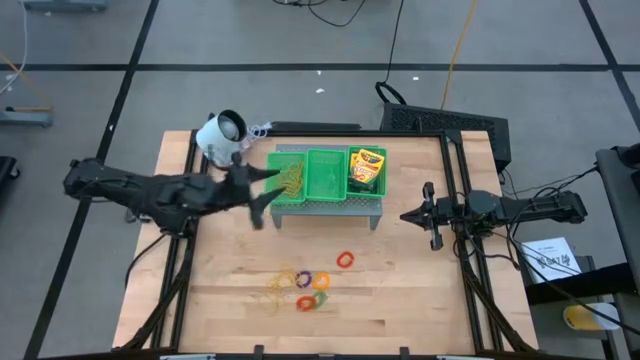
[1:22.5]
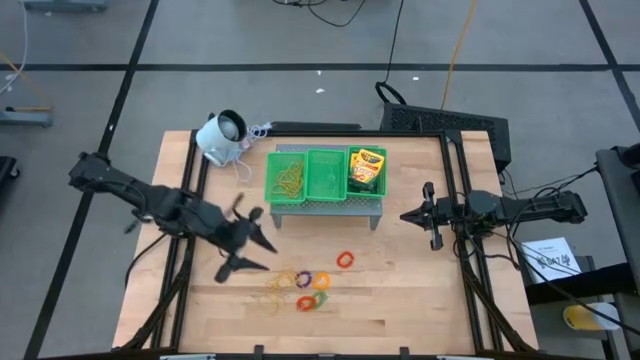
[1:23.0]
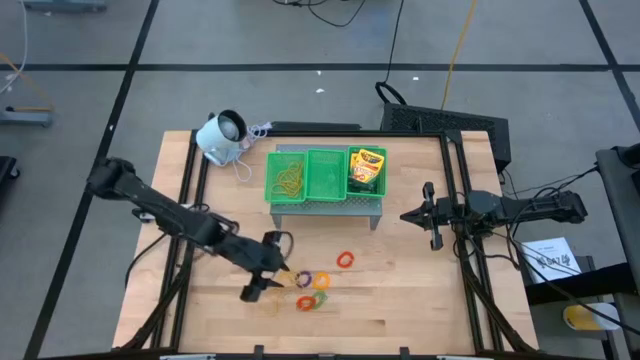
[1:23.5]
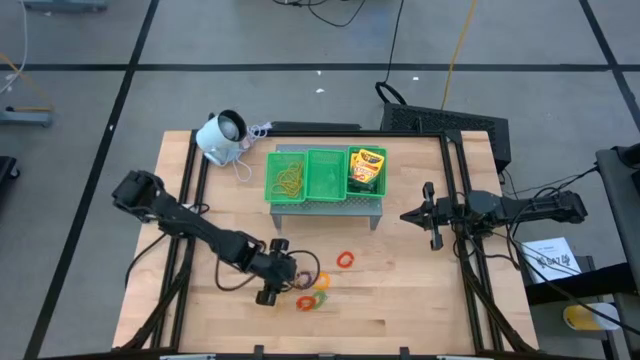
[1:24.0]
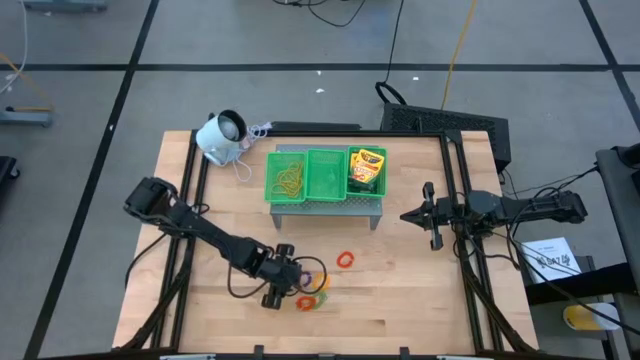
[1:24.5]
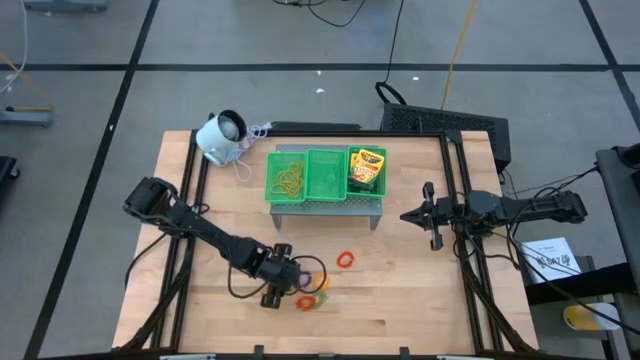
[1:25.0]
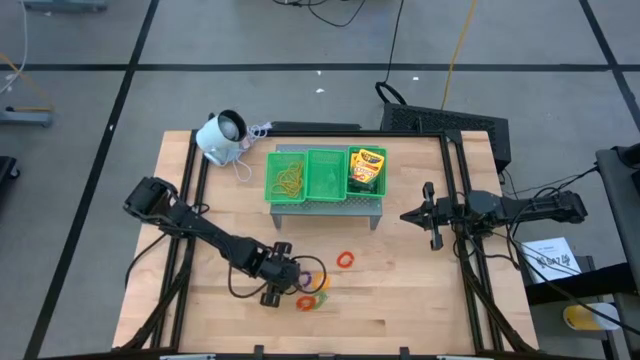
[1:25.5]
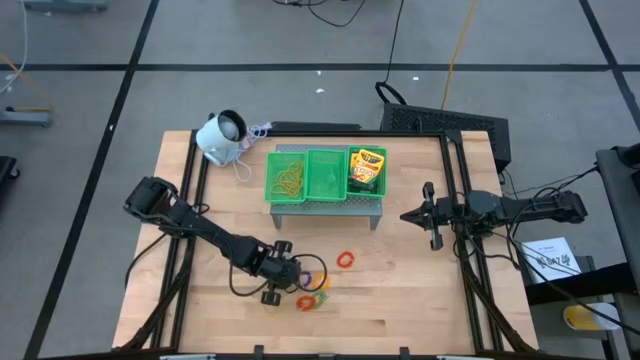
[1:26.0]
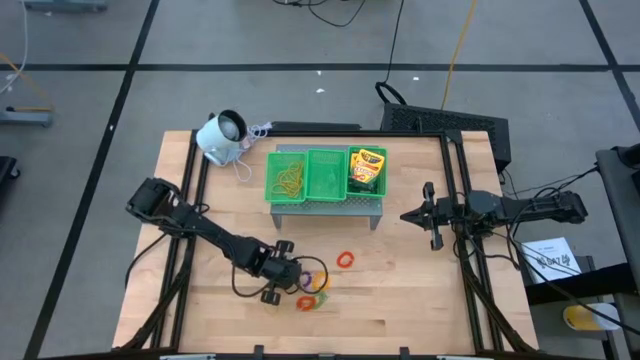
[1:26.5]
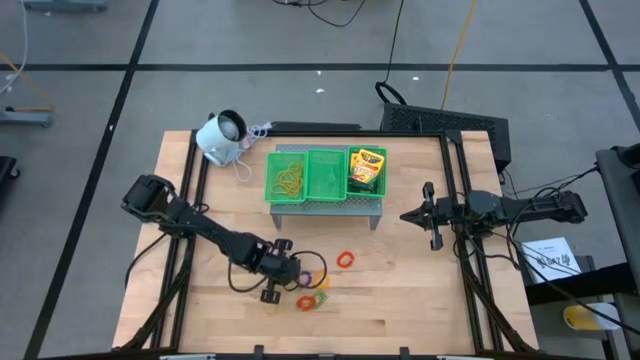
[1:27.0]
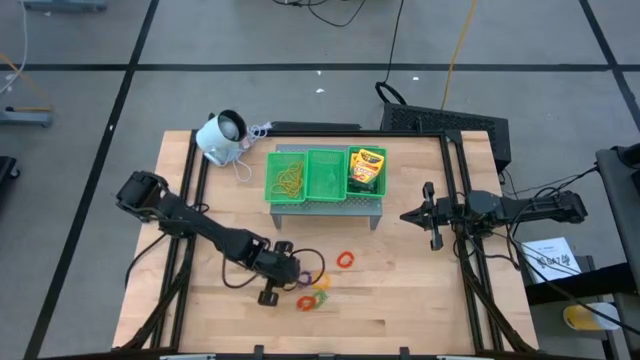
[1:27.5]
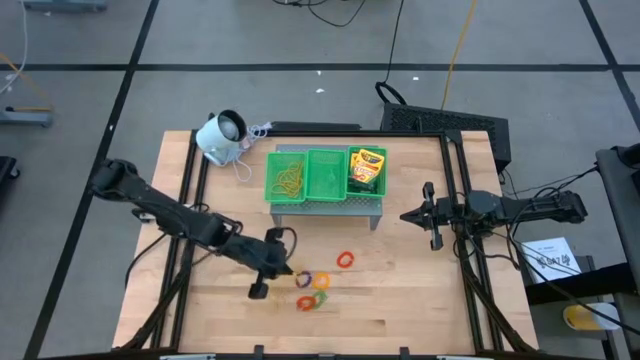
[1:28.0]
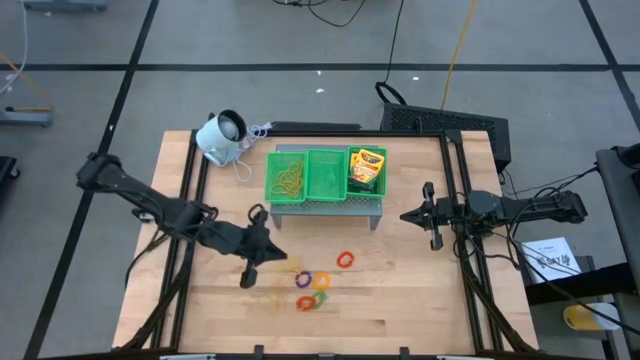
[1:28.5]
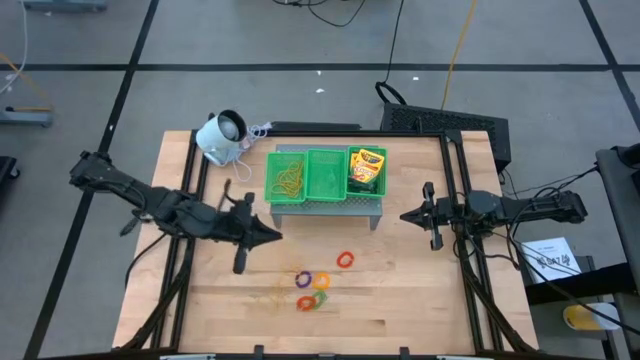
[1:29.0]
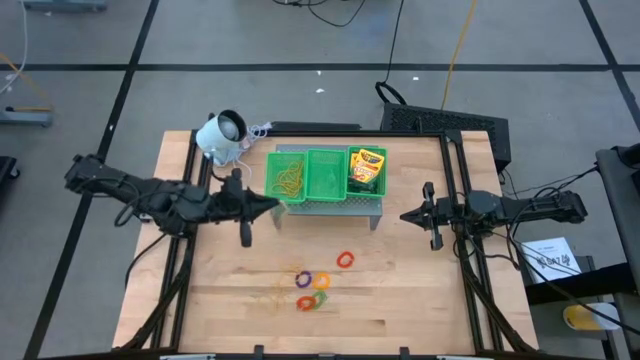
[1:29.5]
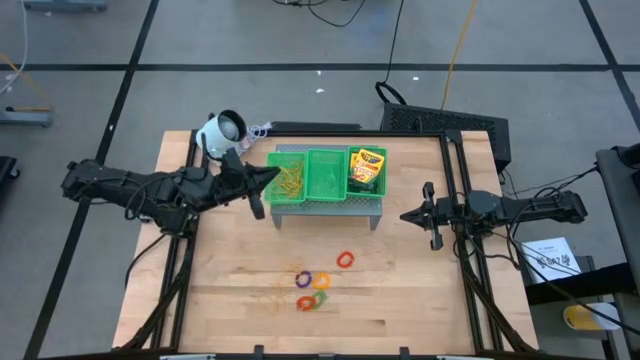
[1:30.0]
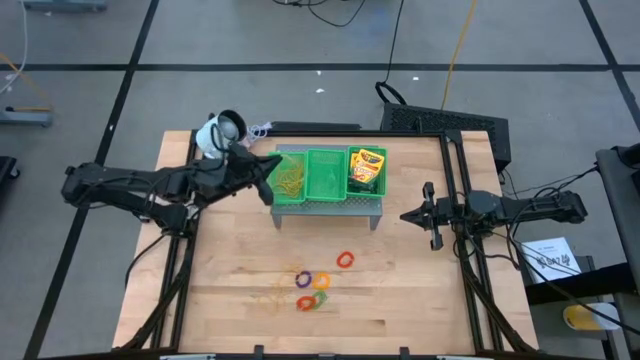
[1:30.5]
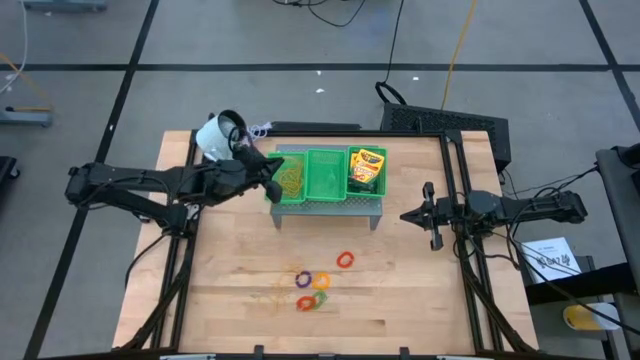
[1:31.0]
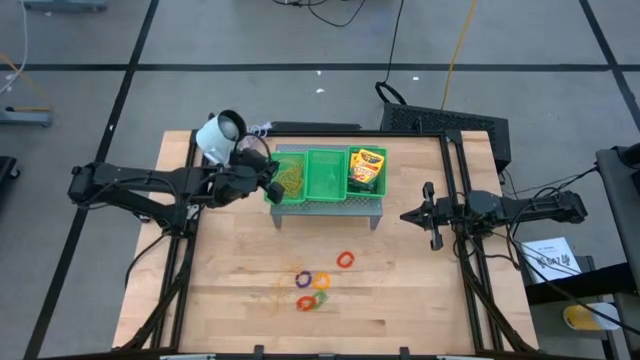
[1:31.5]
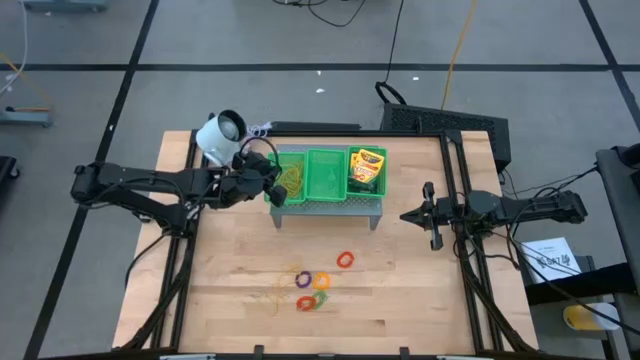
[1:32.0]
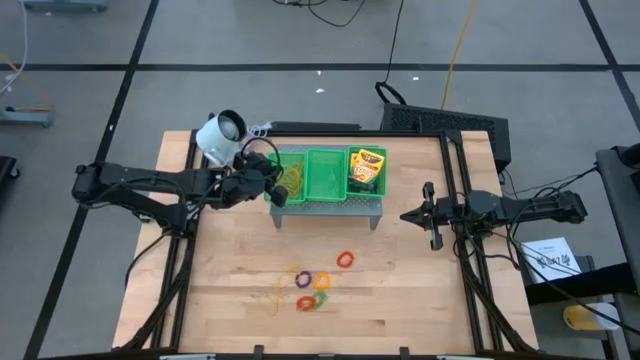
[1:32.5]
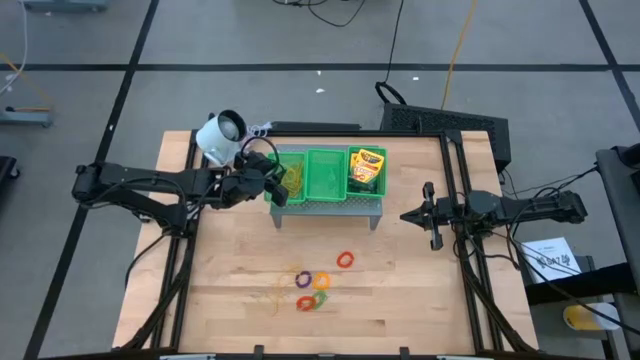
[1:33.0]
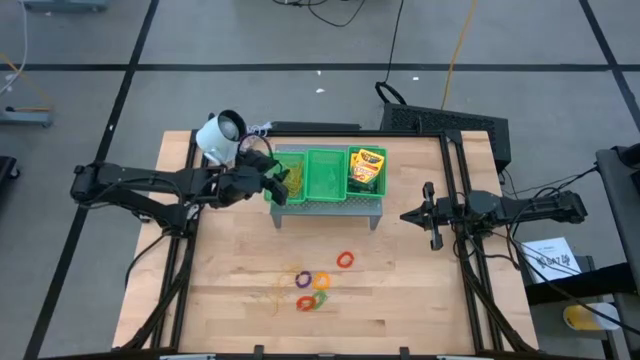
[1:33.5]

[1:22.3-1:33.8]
Task: Pick & Place Office Desk Supplies
Put the yellow rubber band into the left green basket

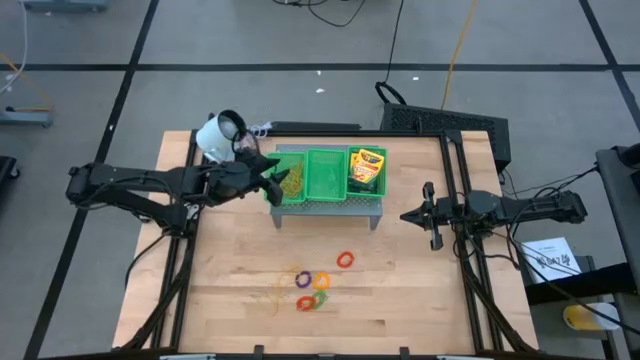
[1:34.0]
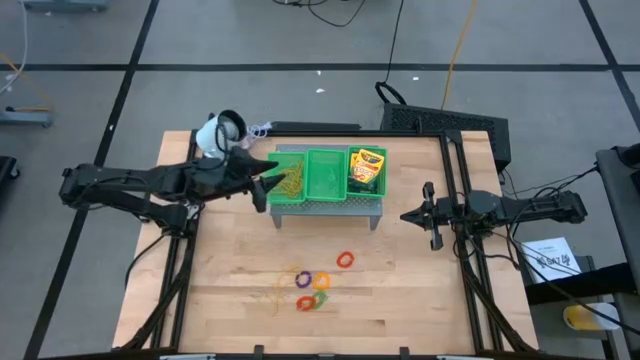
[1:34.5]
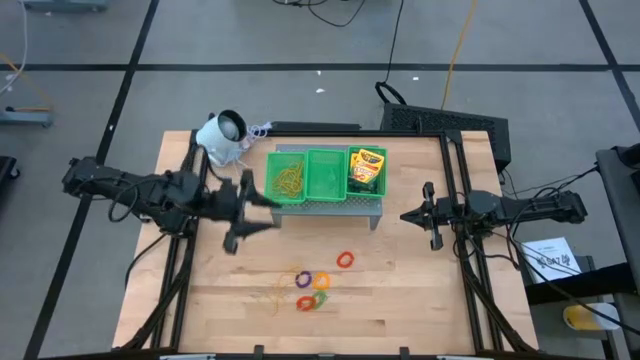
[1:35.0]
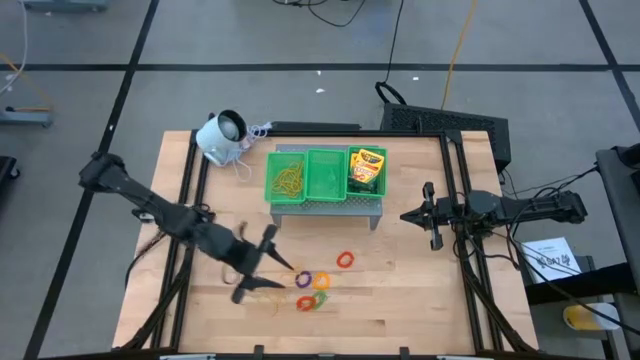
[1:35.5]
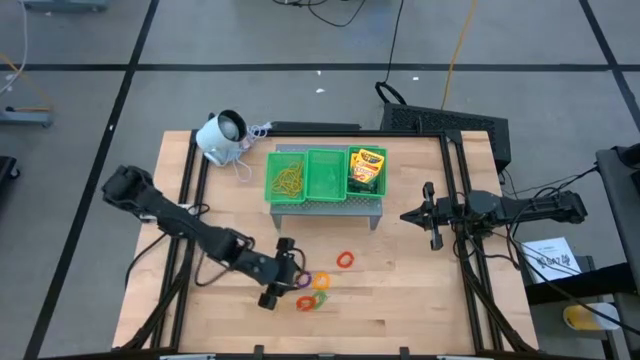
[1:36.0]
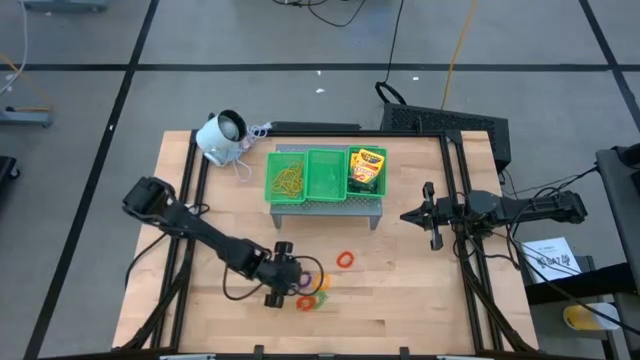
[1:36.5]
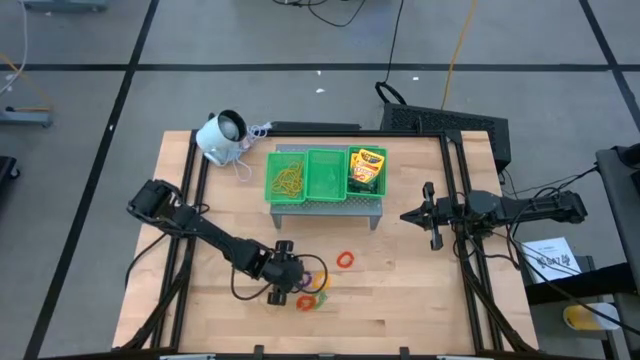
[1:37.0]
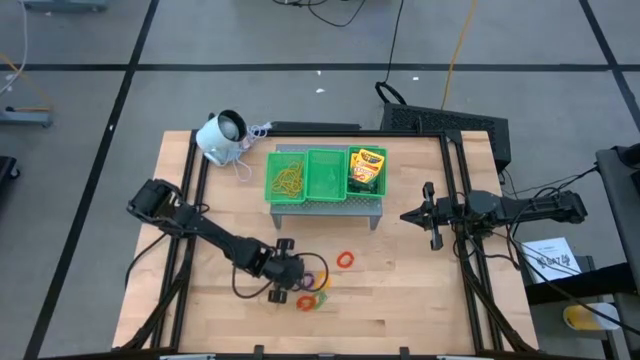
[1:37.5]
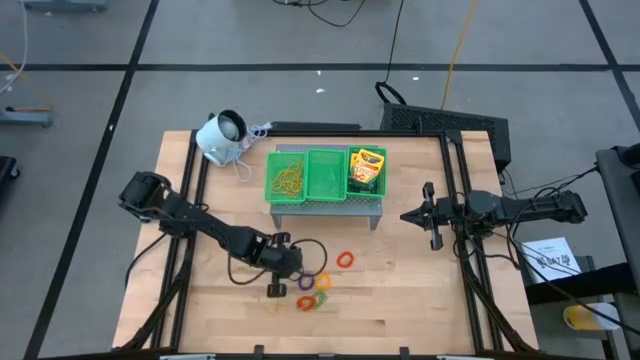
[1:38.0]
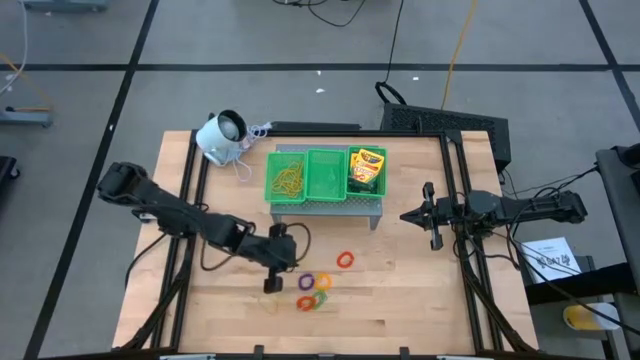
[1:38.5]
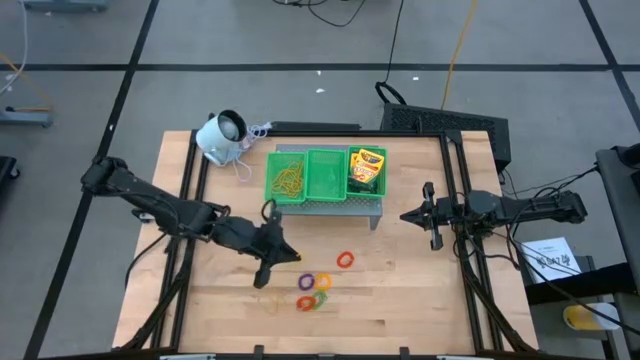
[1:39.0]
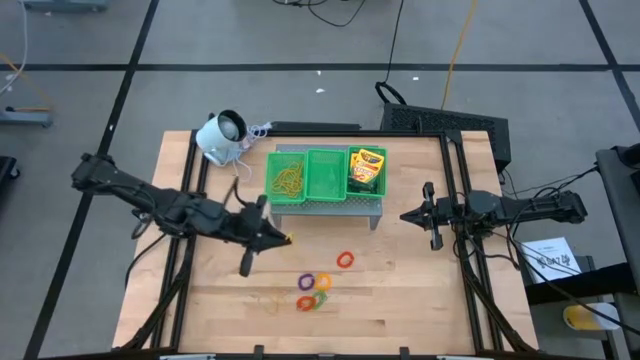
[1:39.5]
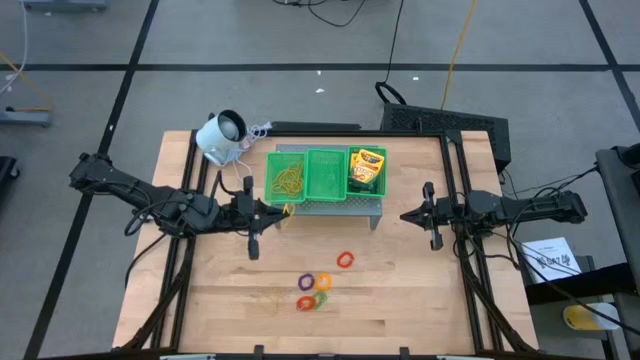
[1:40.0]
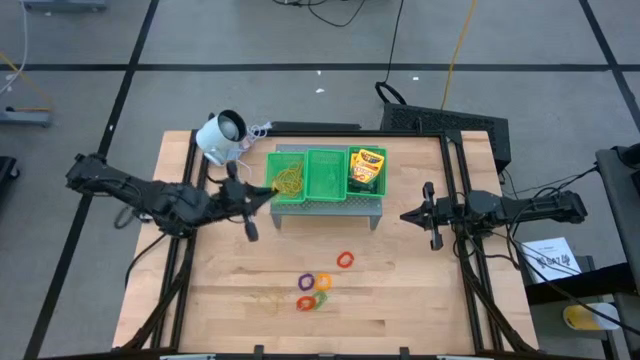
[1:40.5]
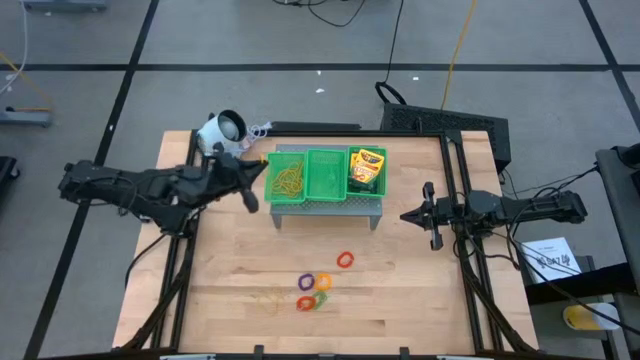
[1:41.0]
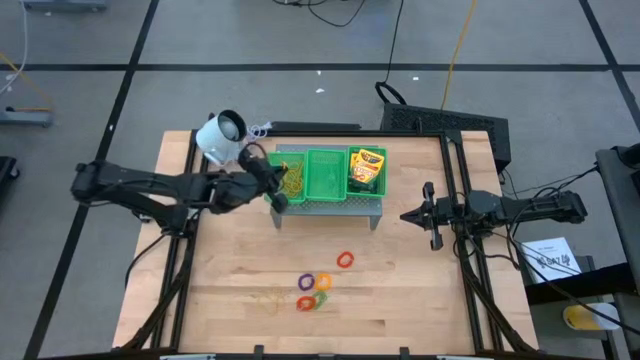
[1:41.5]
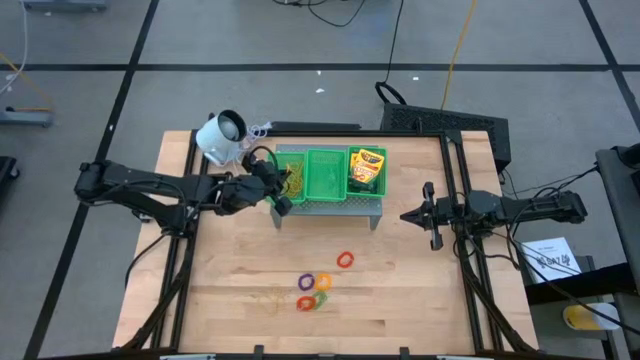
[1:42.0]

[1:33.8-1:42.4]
Put the yellow rubber band into the left green basket

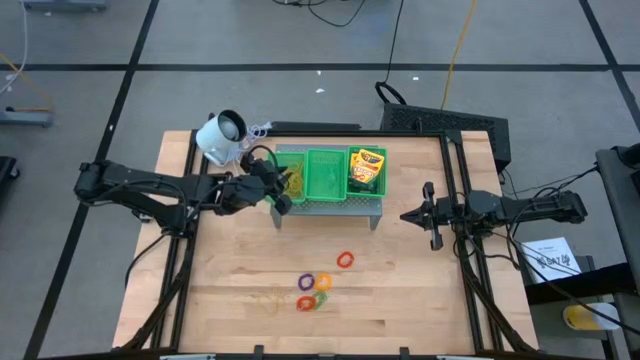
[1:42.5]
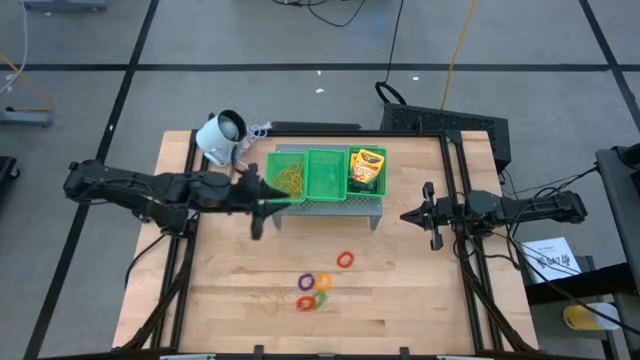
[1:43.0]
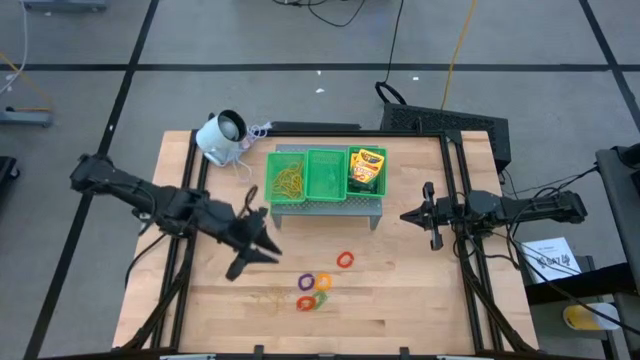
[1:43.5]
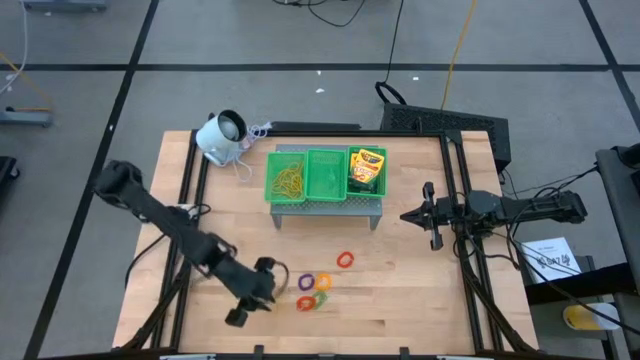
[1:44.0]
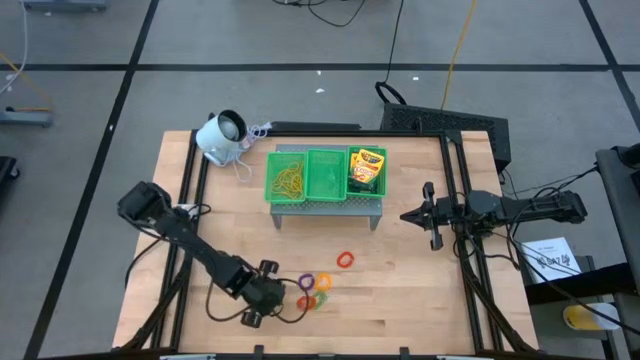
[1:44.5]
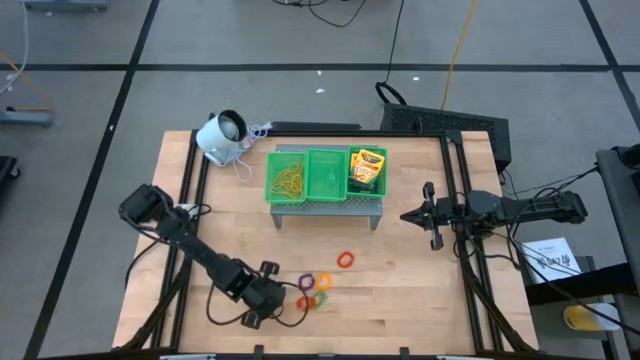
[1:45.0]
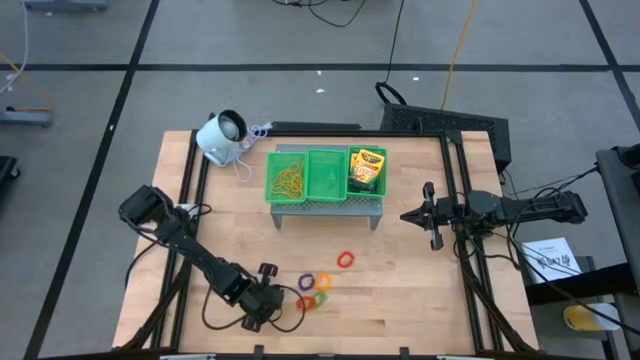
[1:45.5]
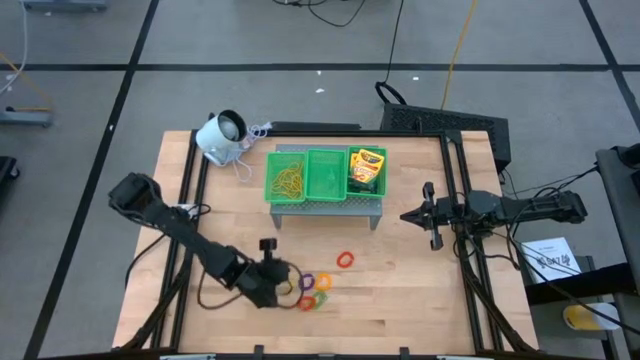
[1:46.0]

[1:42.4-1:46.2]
Put the yellow rubber band into the left green basket
